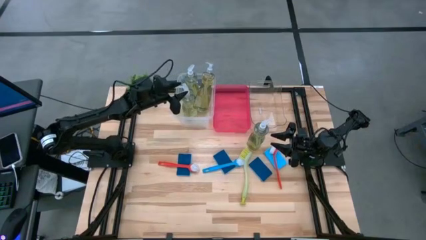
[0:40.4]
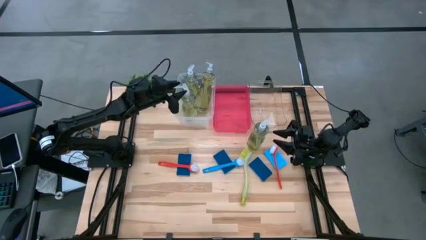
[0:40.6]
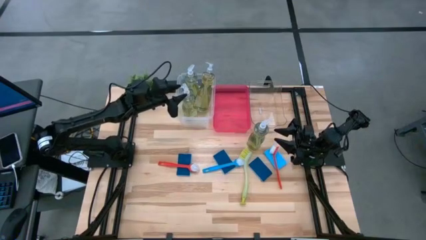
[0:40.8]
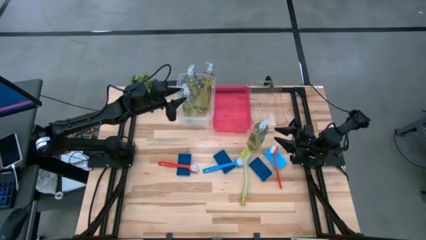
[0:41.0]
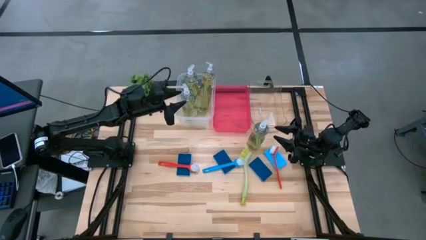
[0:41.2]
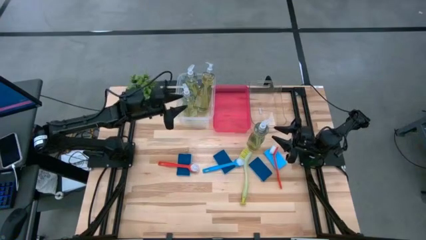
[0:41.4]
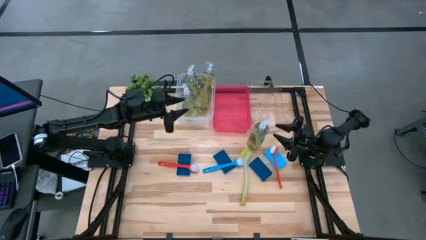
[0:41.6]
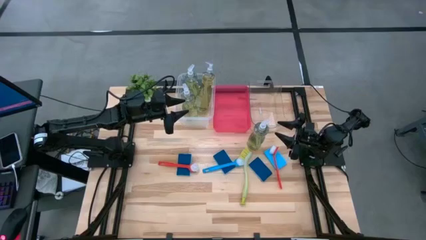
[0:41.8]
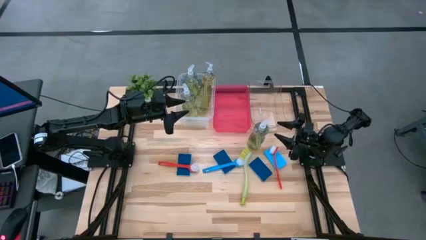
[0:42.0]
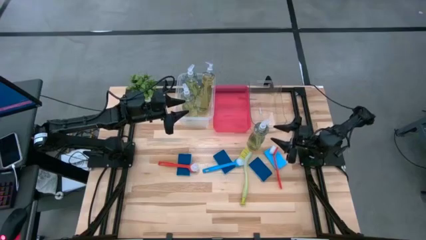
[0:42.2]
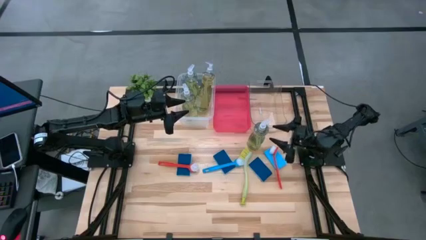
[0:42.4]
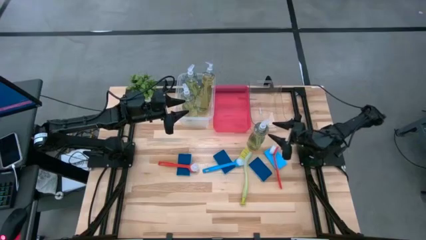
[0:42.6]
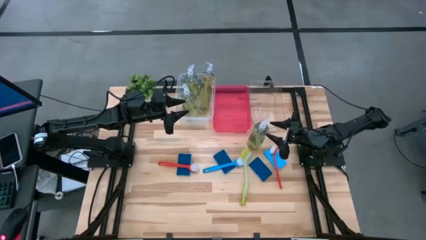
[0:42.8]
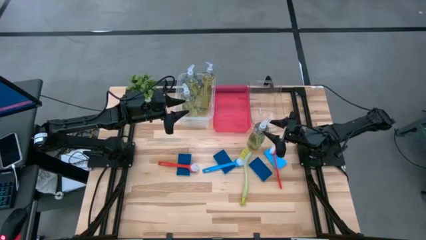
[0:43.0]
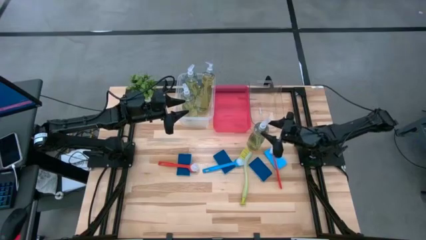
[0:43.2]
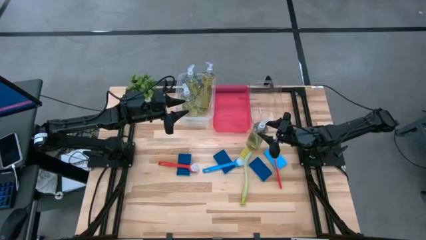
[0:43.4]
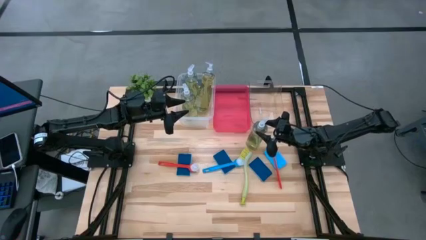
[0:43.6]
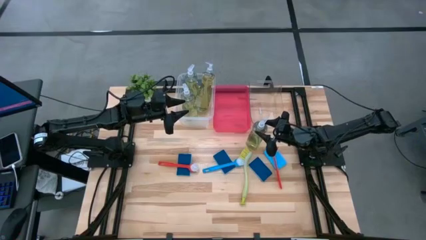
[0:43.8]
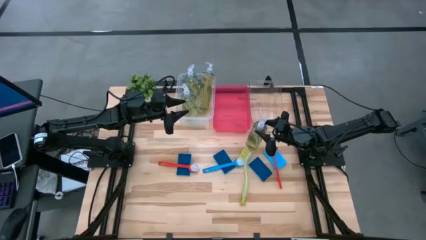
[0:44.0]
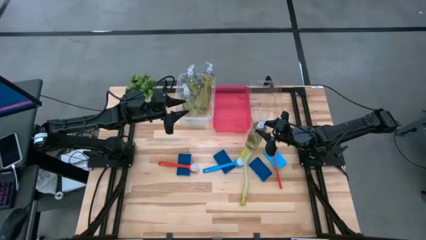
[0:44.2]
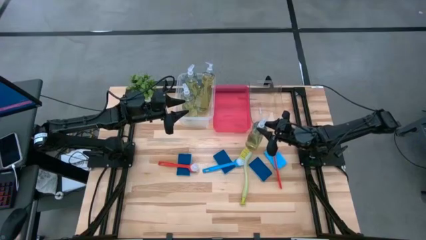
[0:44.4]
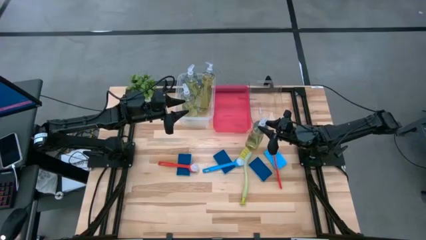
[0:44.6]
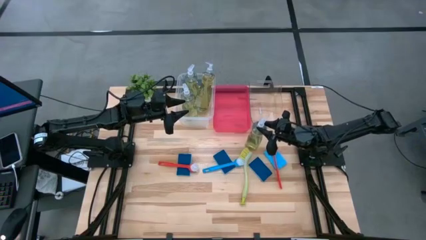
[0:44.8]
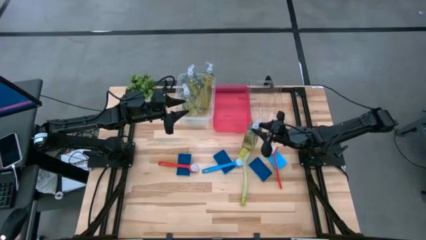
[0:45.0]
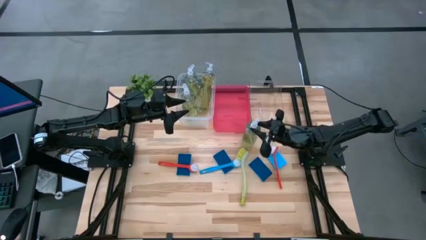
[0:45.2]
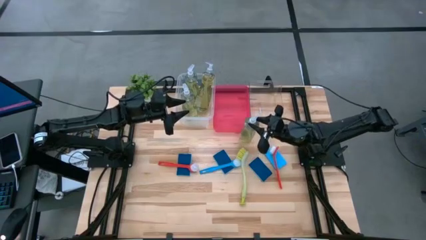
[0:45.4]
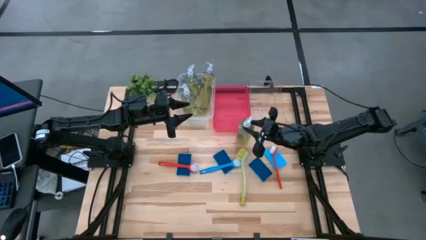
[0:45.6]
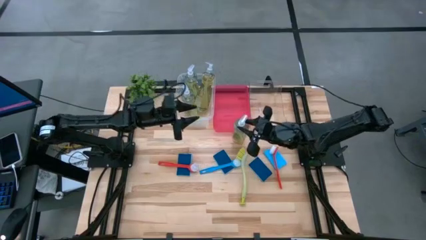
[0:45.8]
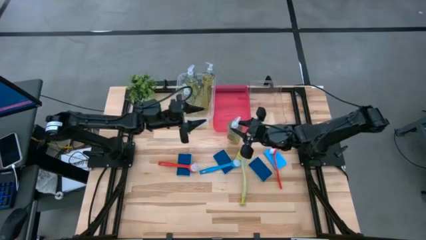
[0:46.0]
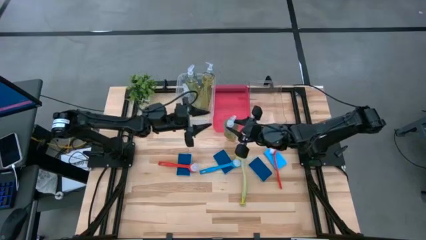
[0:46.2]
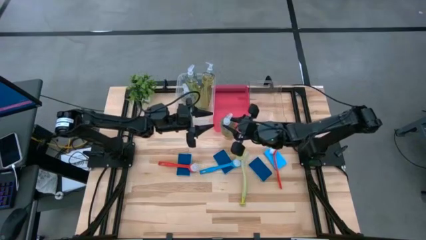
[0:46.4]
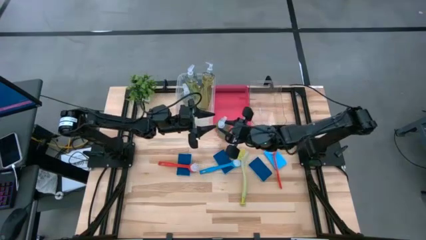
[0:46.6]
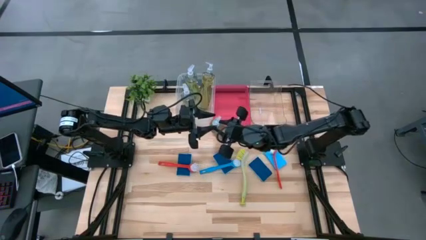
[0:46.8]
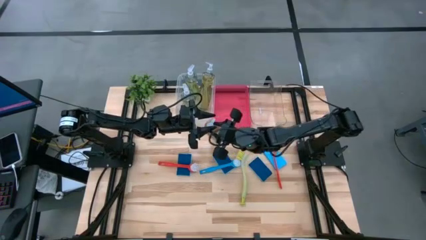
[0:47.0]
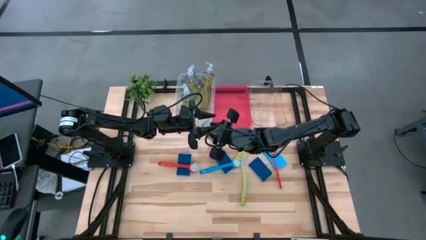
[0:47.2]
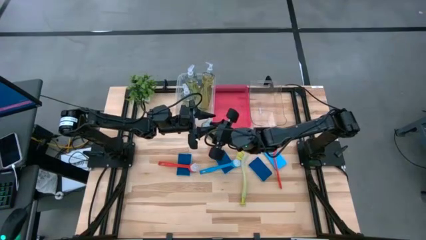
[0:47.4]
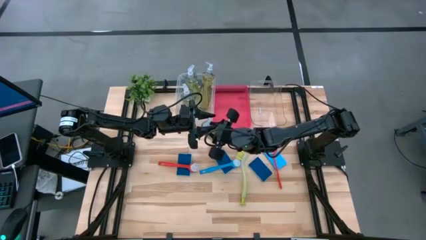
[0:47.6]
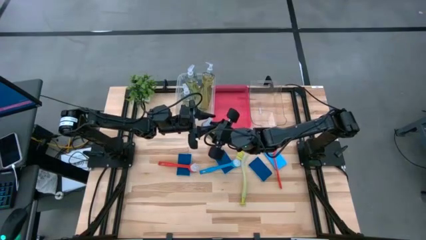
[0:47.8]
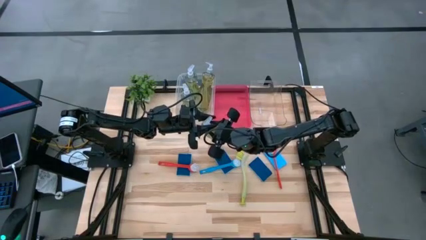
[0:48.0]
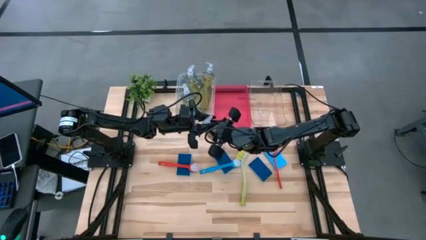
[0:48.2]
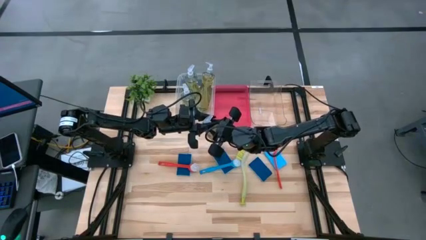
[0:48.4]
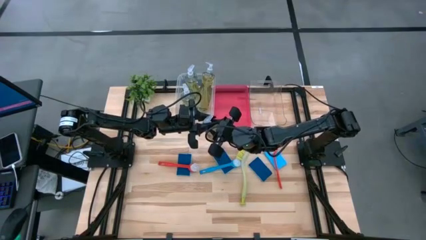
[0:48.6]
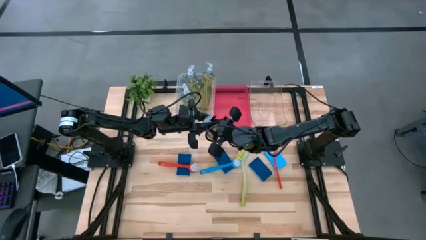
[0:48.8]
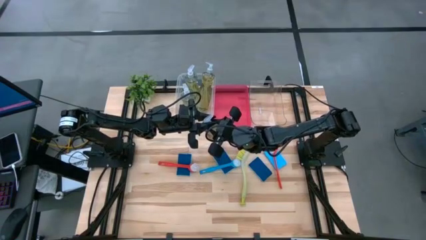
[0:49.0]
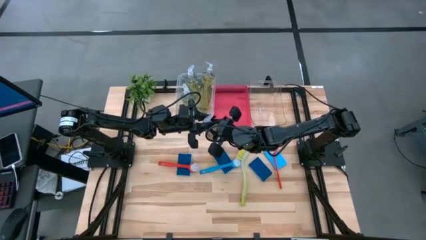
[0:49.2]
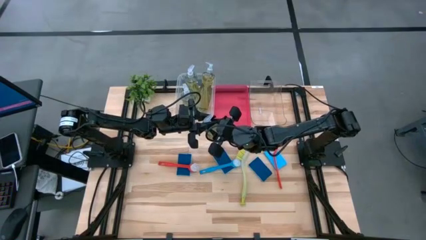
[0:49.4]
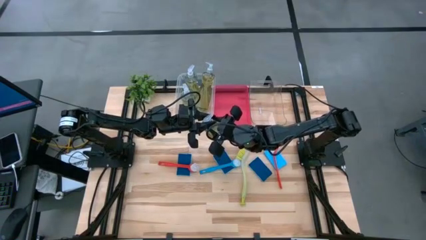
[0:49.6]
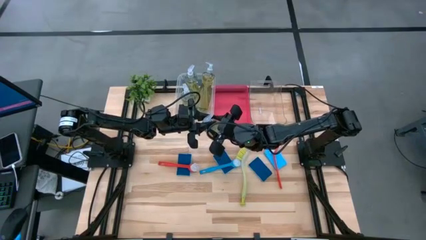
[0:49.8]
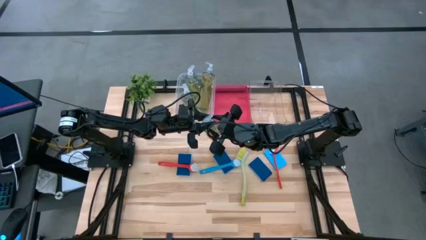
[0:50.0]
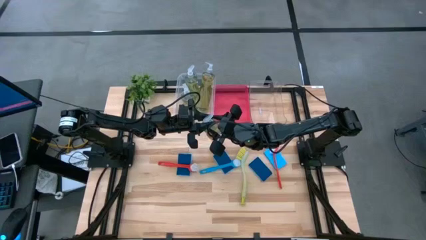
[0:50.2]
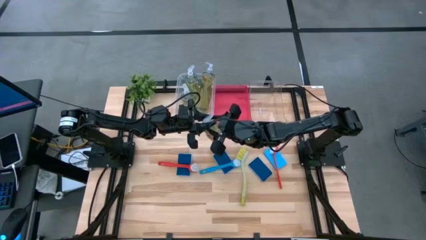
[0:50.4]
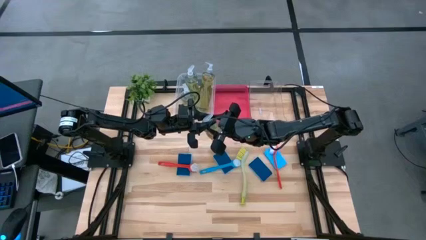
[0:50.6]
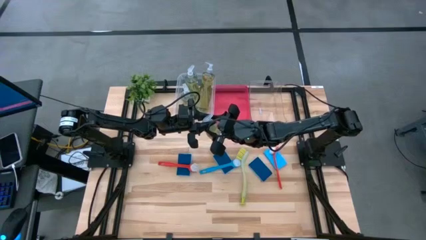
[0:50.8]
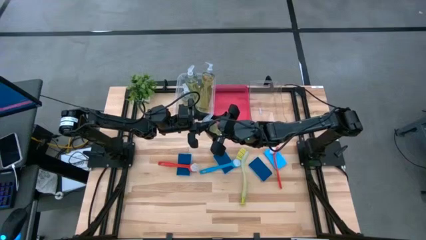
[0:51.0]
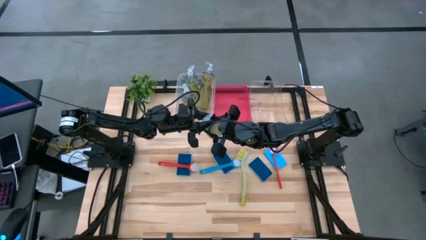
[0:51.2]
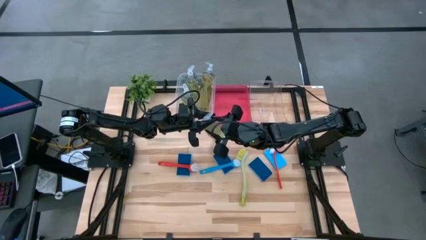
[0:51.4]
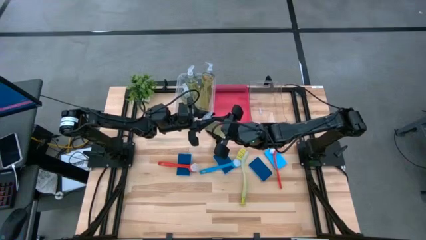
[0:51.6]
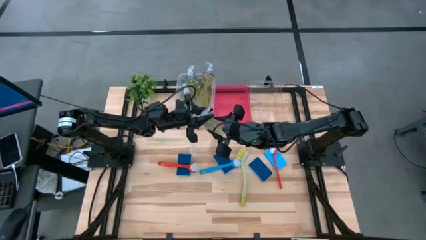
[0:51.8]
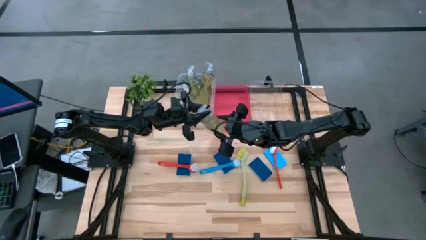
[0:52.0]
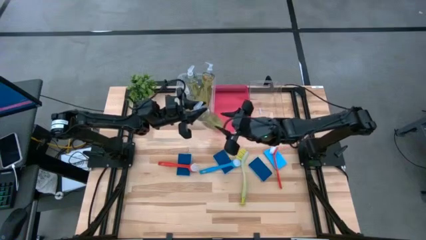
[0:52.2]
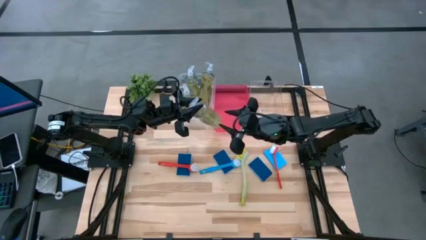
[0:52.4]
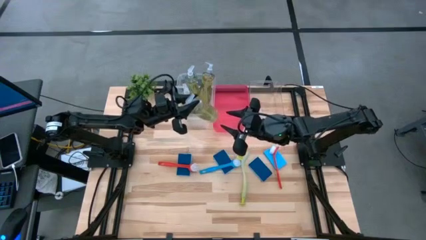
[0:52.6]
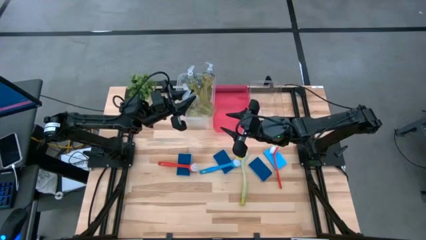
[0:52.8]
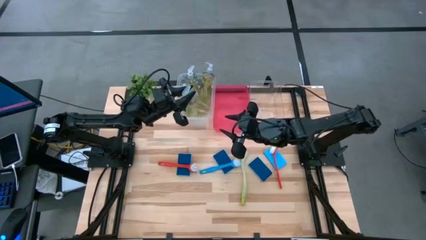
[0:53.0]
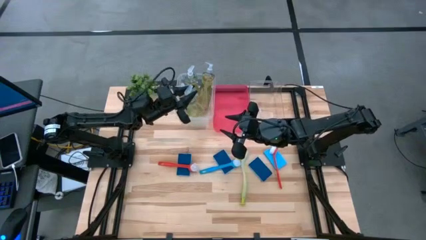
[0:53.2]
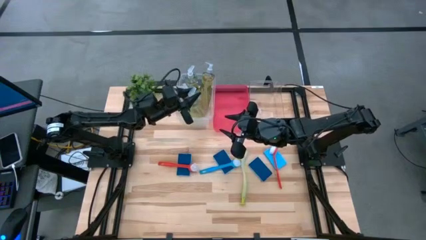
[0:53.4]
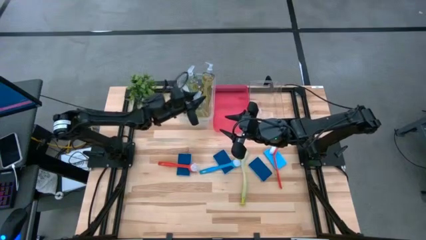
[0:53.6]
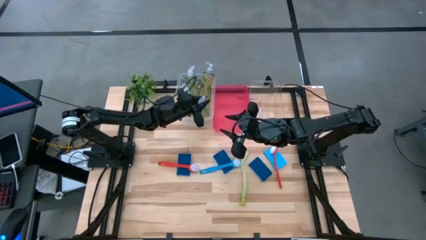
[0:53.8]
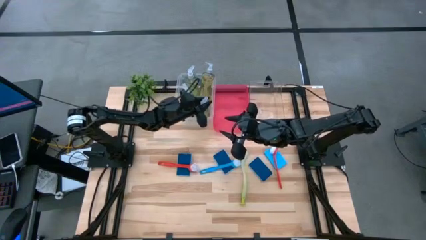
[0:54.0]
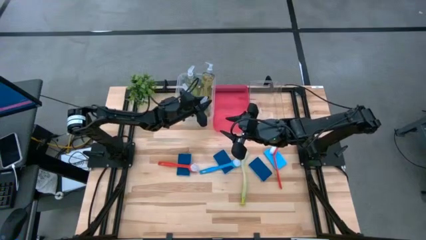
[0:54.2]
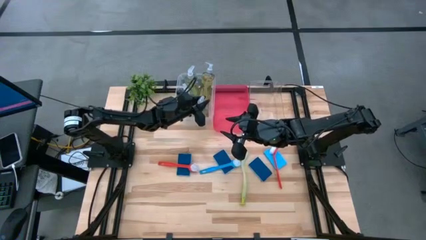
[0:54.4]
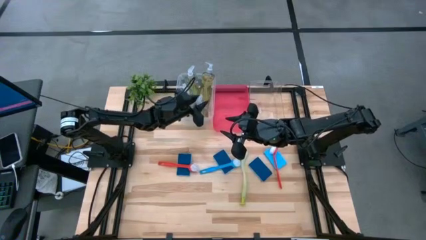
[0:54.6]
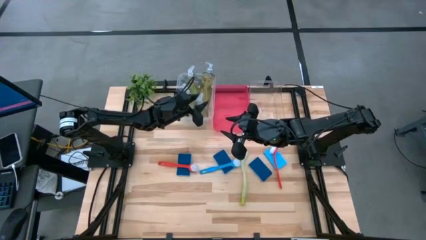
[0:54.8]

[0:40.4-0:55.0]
Task: Pick & Place Kitchen Sink Supplies
Put the yellow dish soap into the transparent container

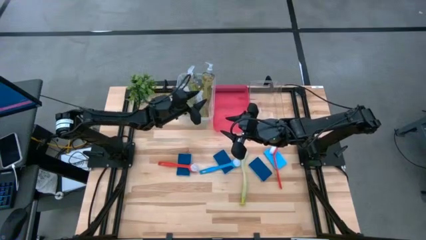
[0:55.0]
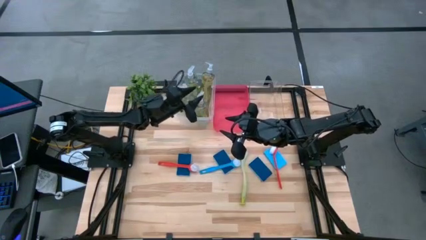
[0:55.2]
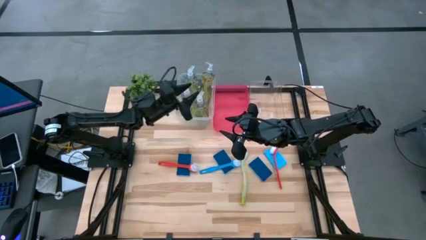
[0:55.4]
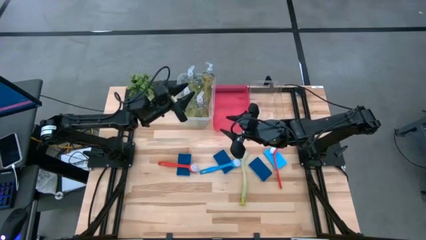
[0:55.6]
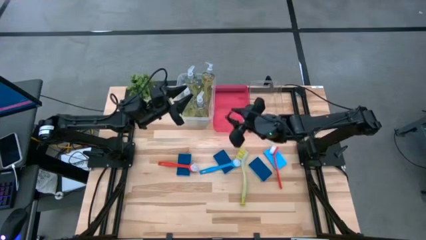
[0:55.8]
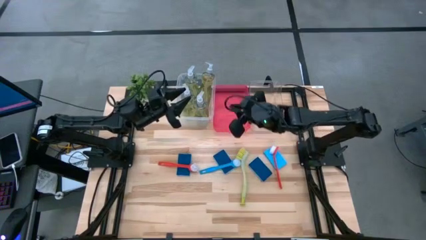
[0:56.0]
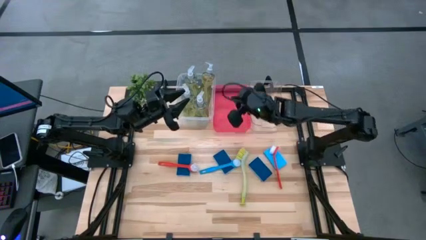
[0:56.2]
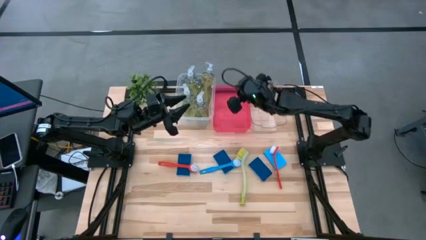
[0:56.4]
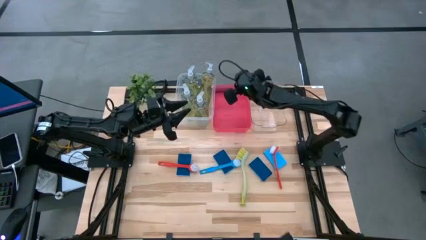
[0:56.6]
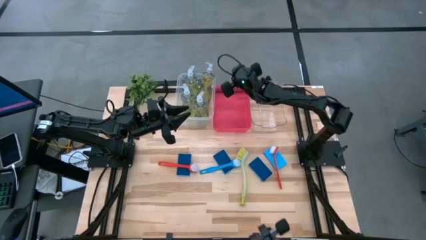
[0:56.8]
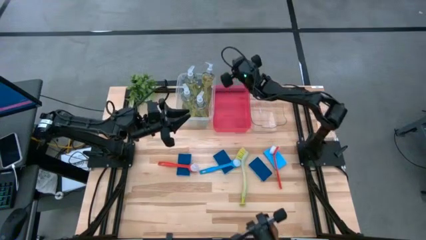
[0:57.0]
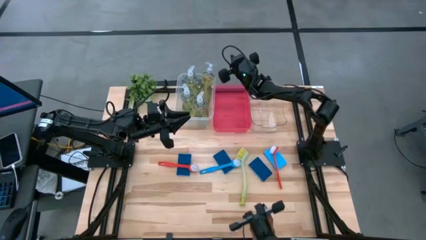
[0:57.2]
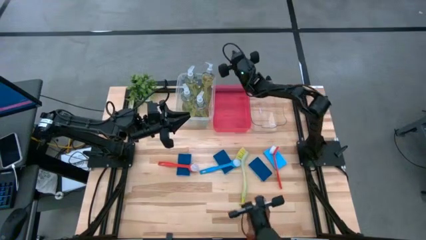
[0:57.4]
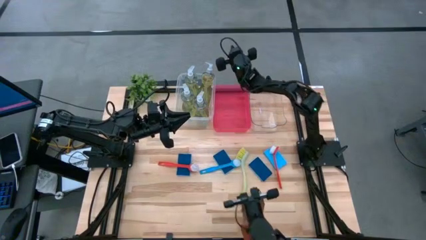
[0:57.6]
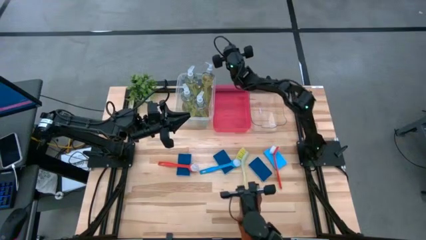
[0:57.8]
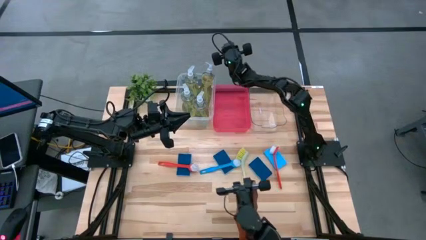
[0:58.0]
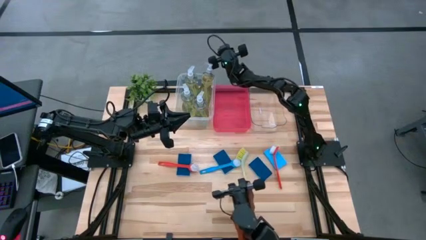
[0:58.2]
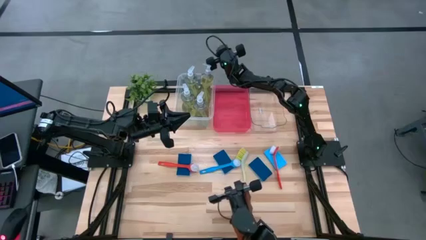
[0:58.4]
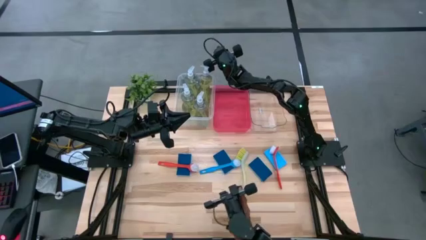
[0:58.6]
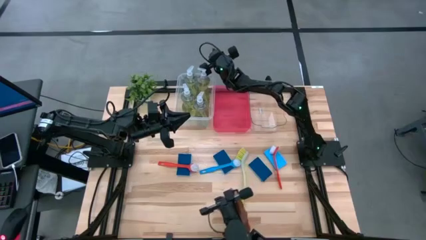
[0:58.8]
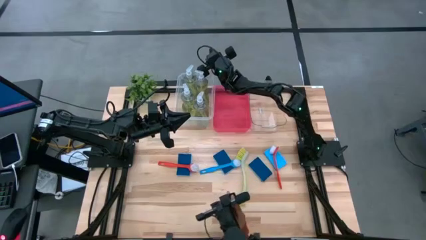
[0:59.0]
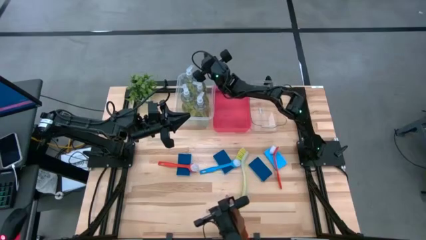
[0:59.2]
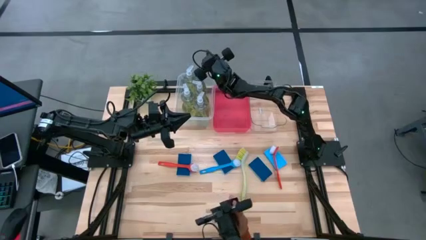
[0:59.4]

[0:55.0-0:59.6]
Adjust the yellow dish soap in the transparent container
